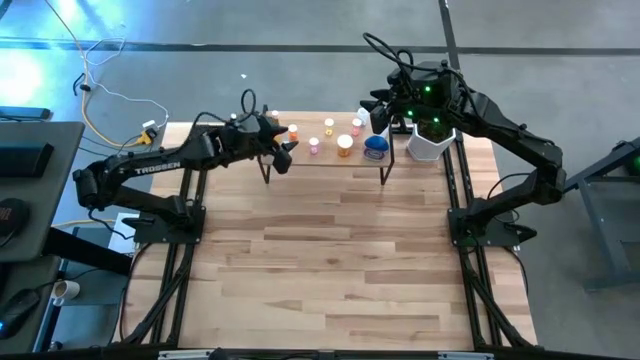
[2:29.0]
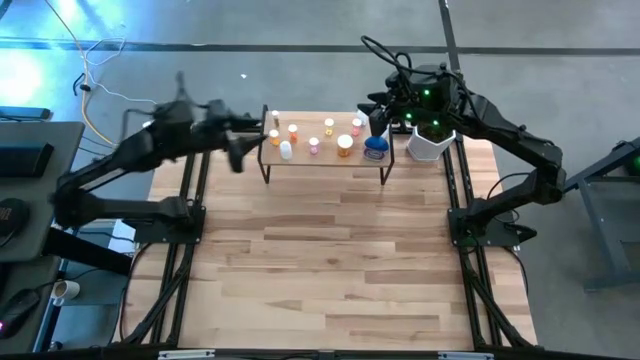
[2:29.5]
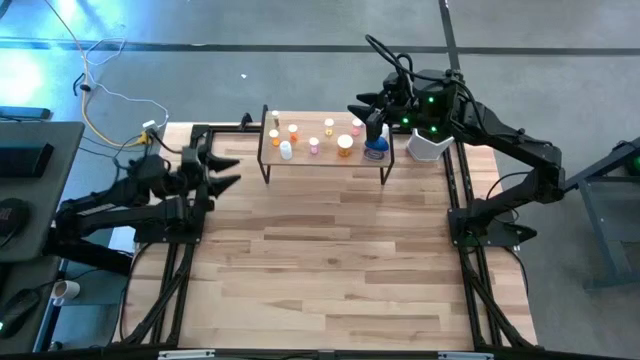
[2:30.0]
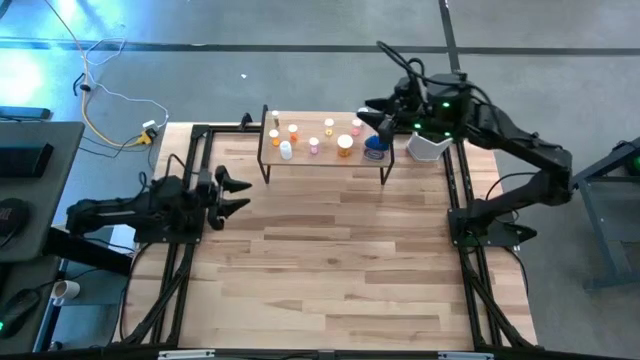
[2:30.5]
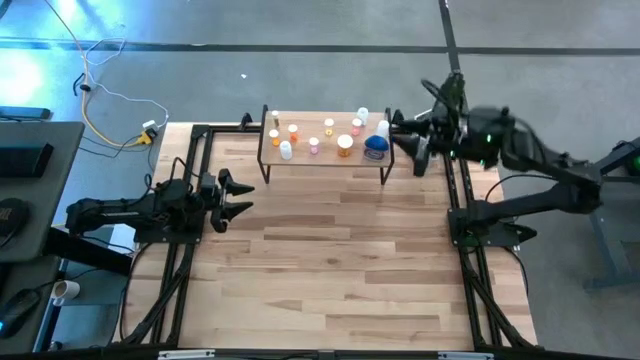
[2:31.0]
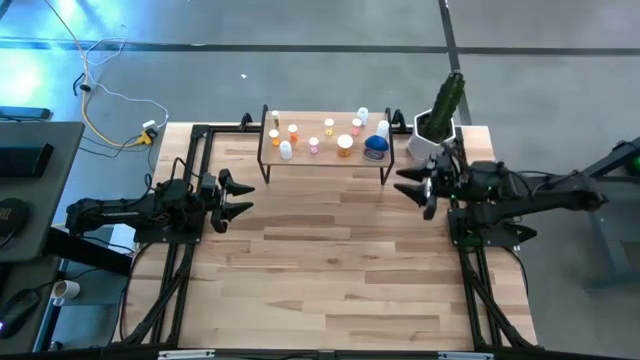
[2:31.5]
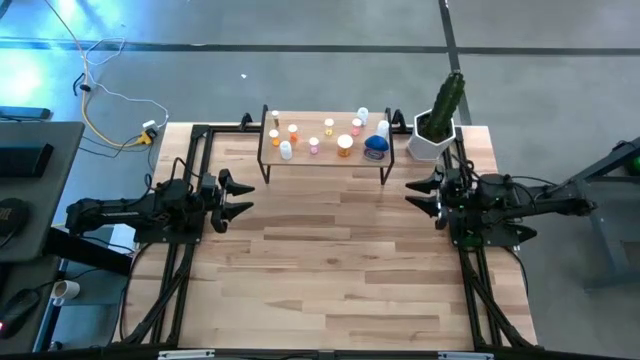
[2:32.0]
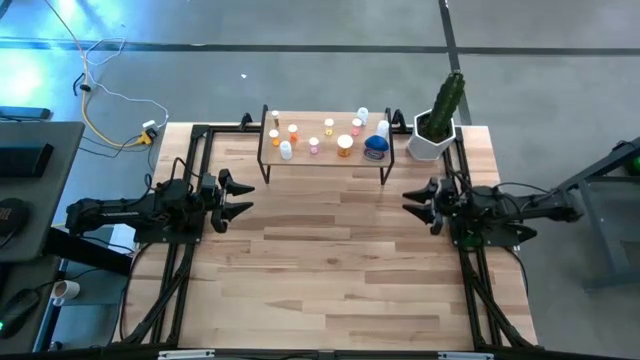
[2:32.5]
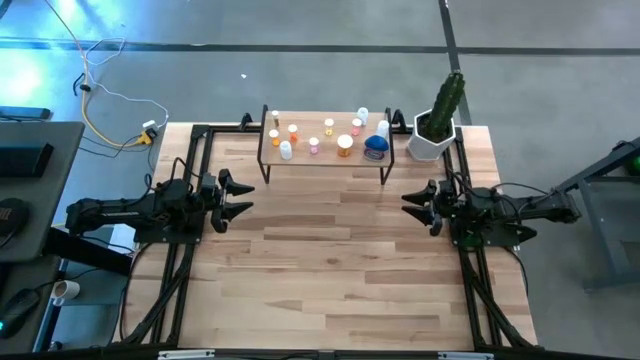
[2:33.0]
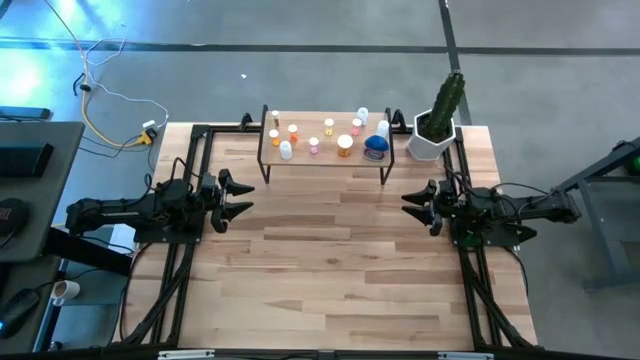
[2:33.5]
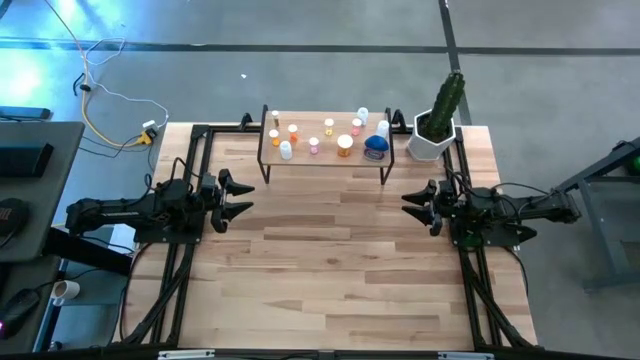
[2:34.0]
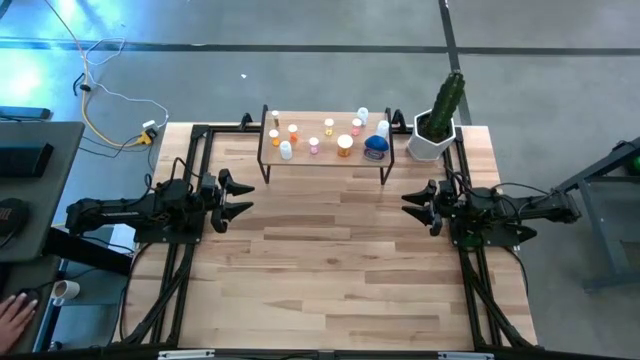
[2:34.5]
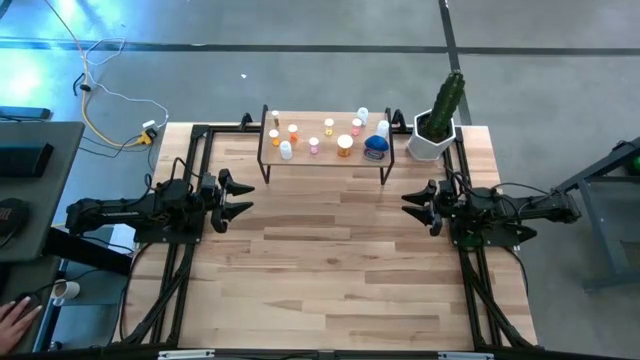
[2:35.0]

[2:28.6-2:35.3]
Task: Pick and place medicine bottles onto shelf by color
Return to Home Position

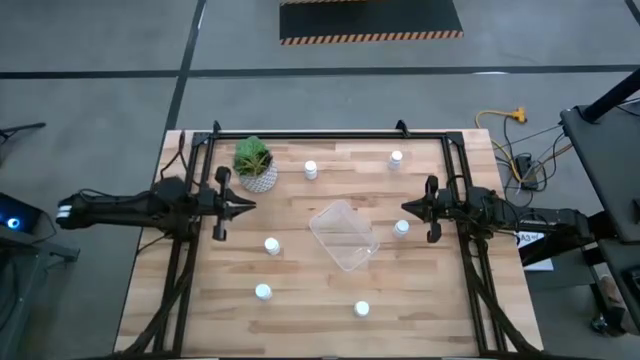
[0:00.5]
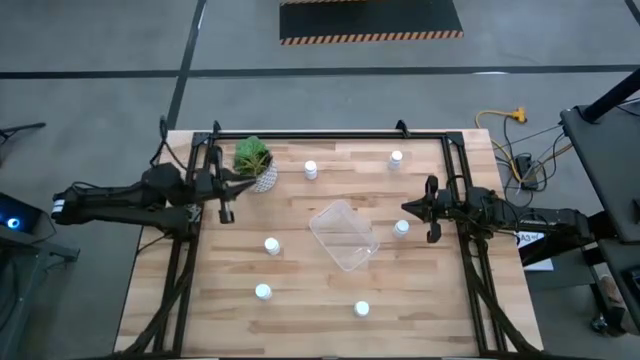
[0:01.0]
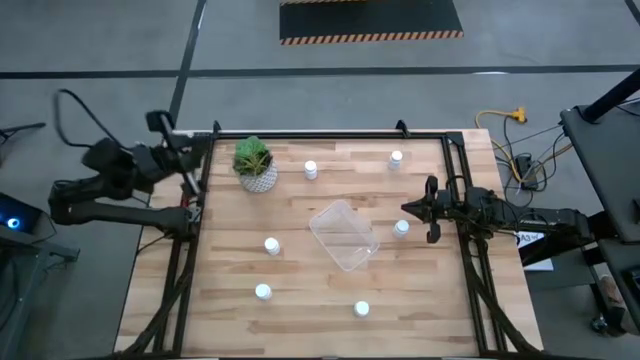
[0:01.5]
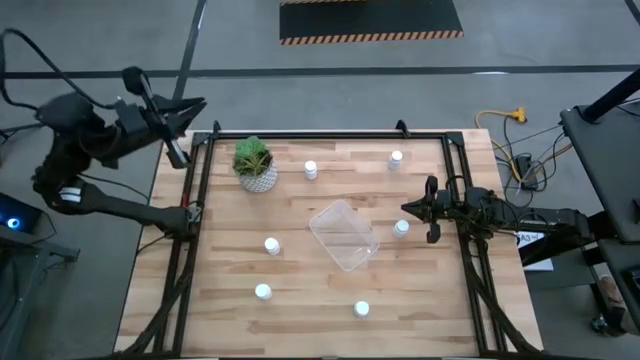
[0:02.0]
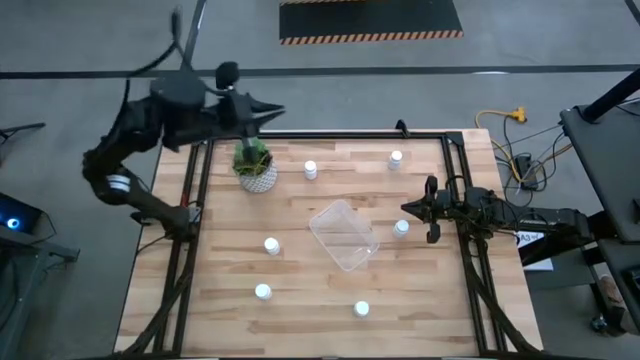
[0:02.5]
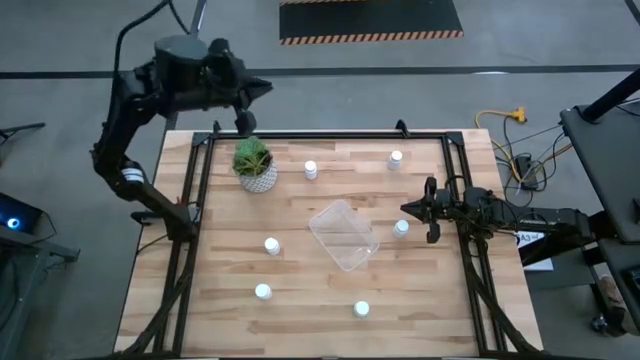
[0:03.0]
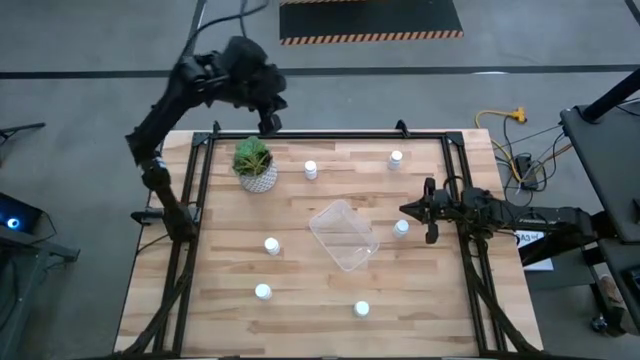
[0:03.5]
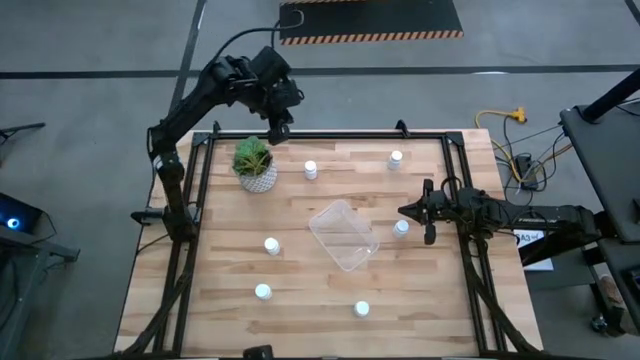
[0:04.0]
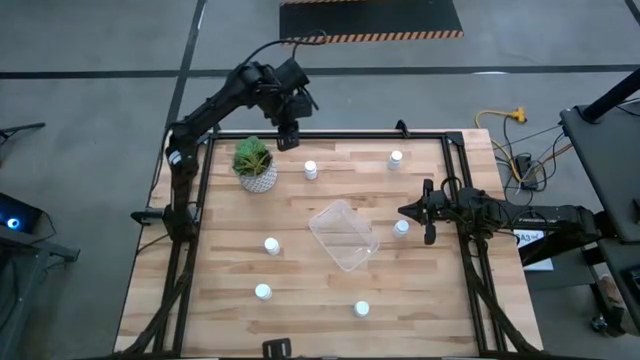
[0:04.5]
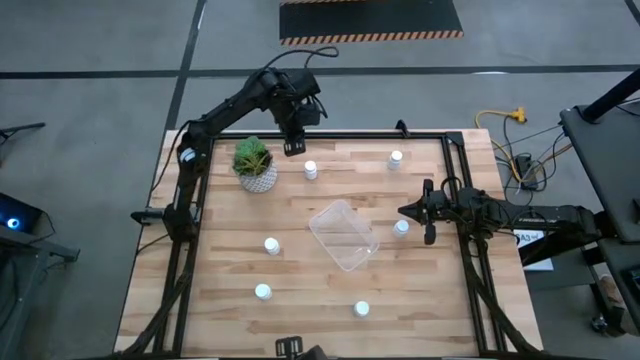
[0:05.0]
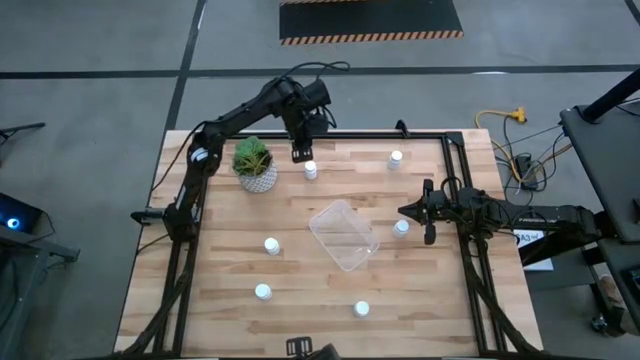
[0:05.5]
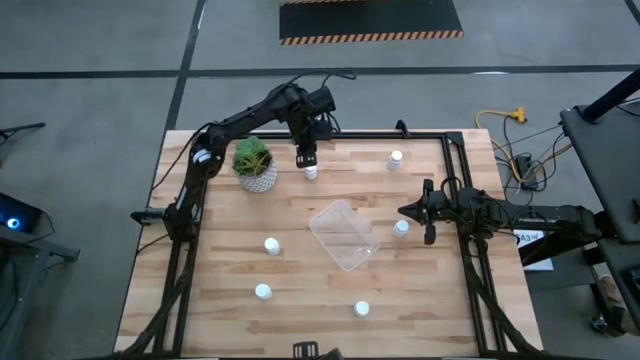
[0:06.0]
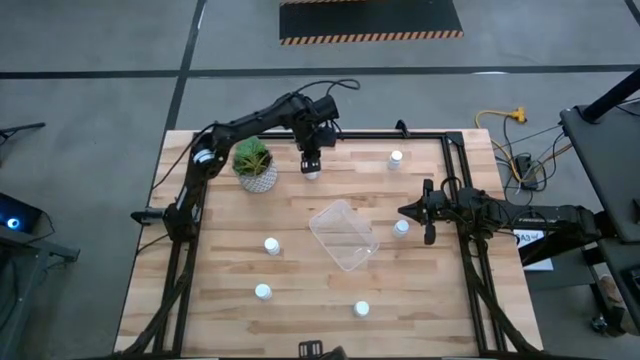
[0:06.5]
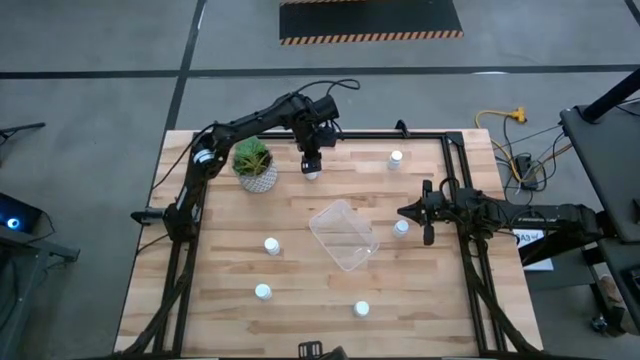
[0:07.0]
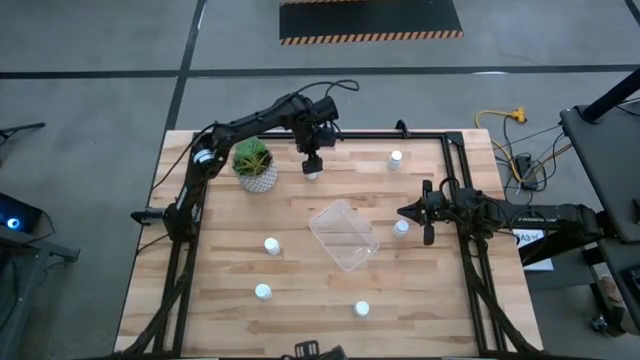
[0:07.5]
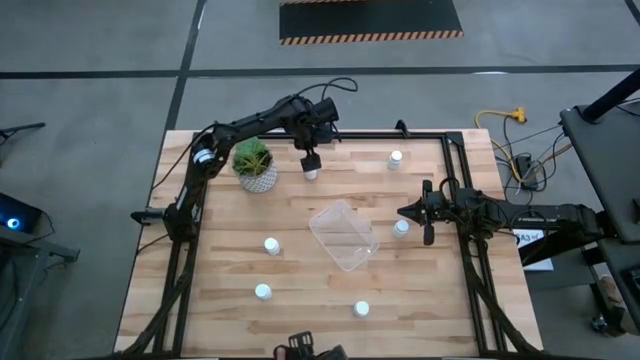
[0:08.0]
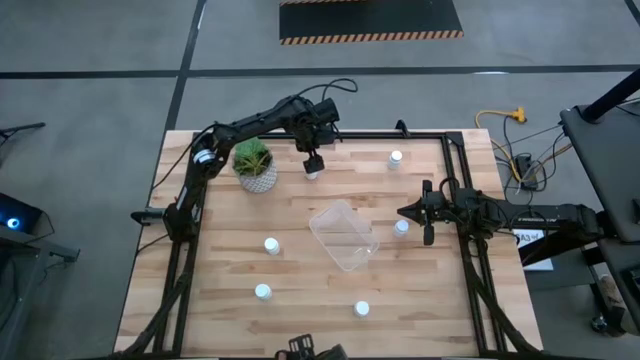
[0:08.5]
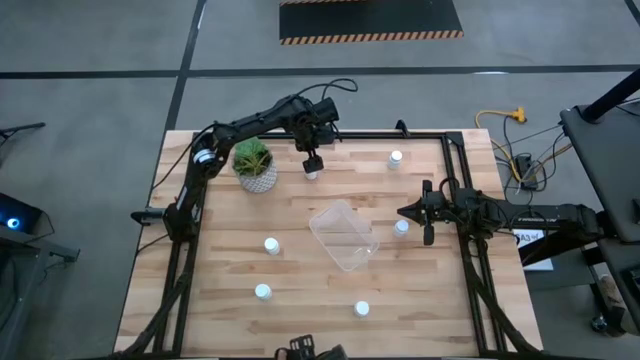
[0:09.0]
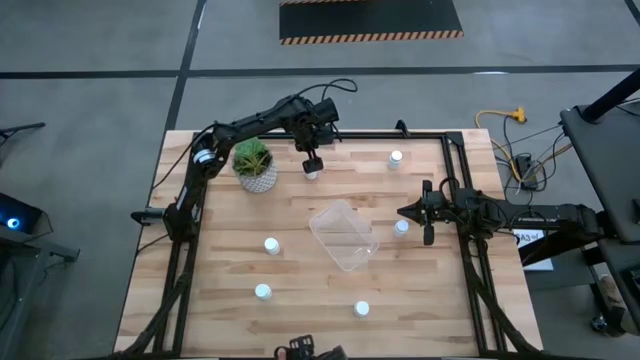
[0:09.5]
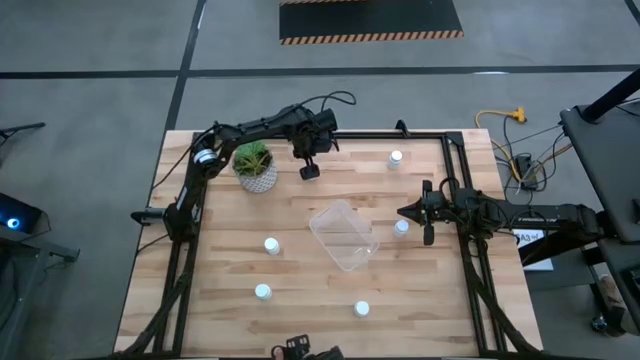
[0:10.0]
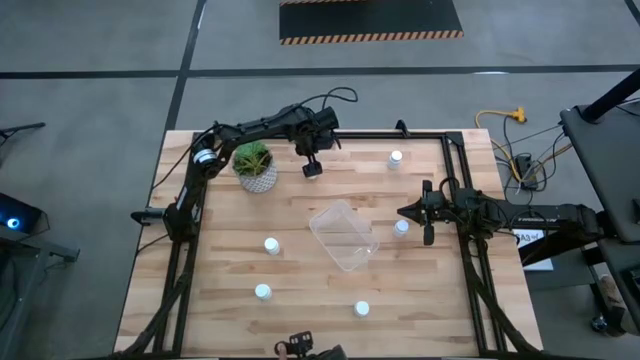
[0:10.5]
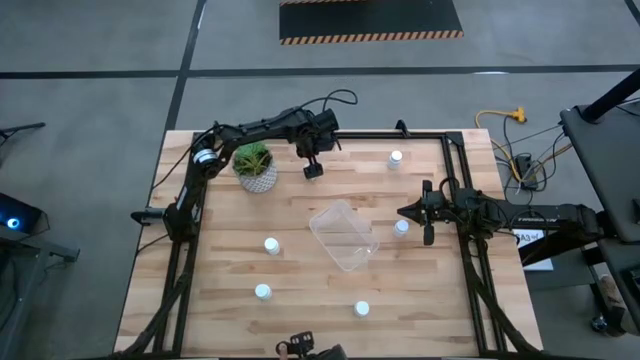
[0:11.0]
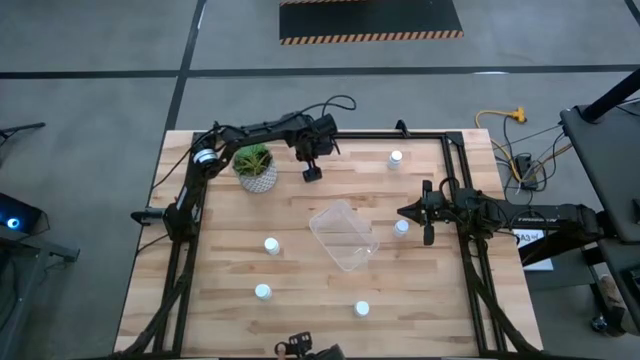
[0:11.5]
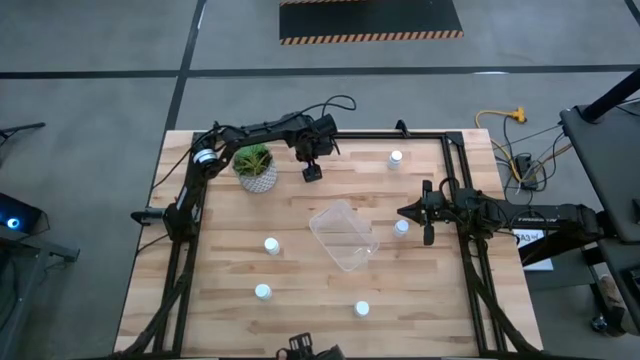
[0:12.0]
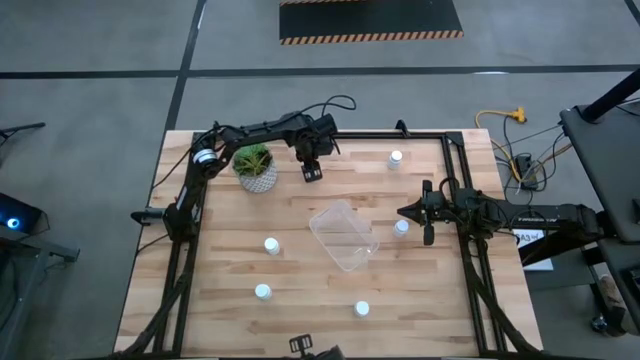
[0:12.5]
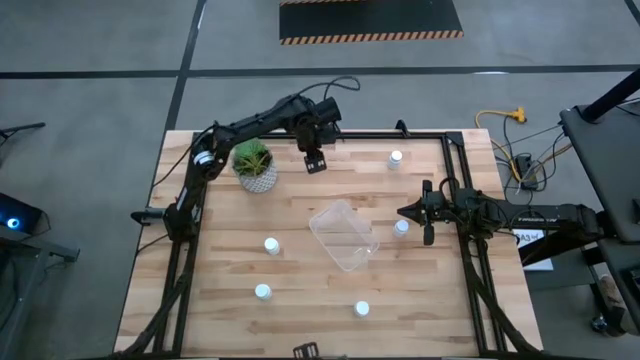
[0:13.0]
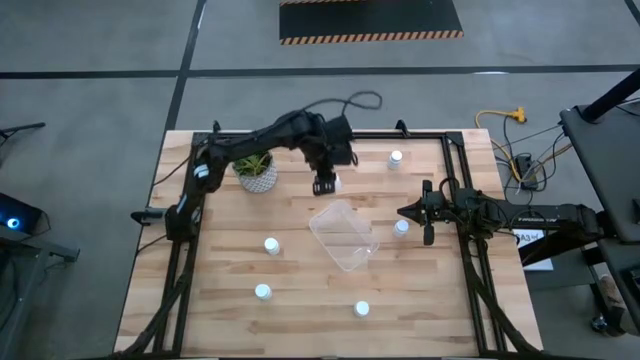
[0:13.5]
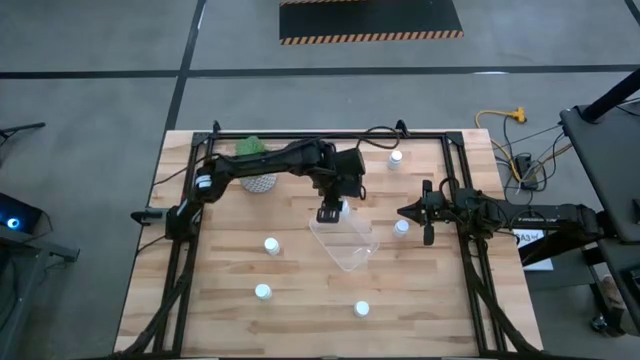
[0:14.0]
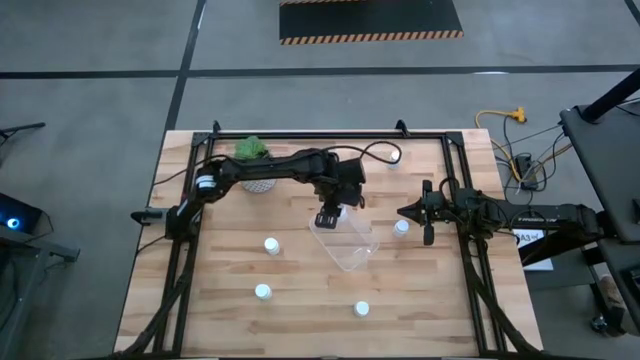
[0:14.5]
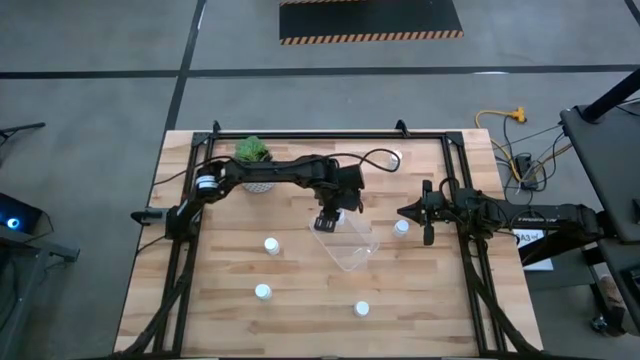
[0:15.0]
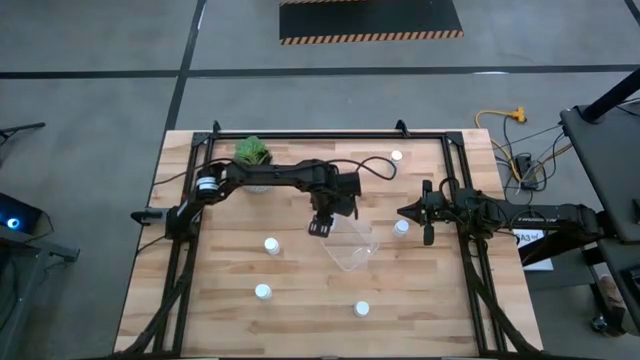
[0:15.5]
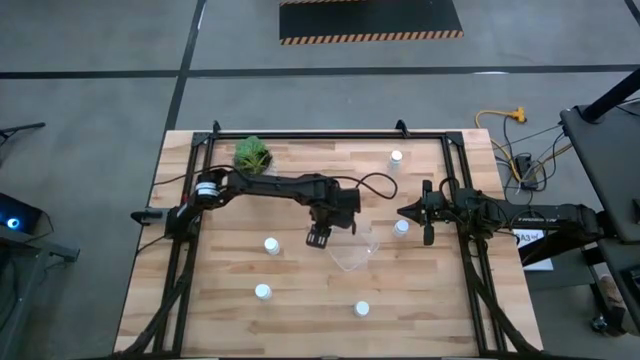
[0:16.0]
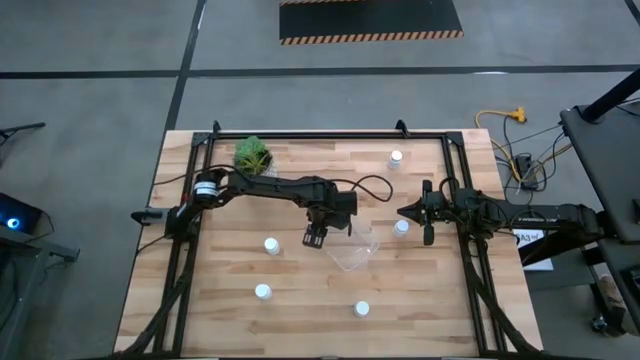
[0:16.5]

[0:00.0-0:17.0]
Task: Pick and place pill bottles into a basket
Put the white medicine bottle in the transparent bin
